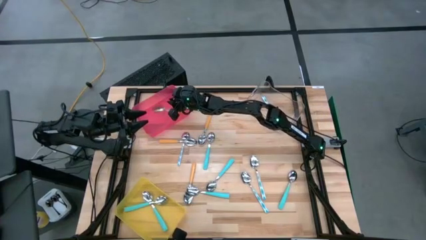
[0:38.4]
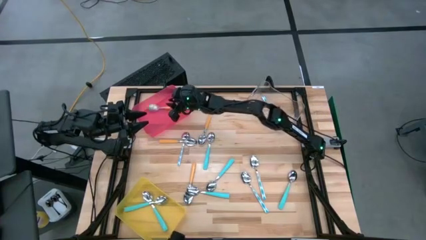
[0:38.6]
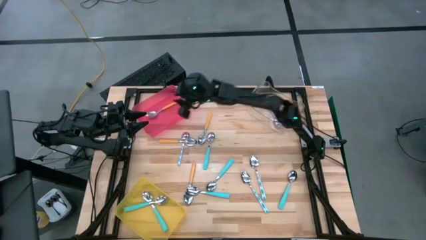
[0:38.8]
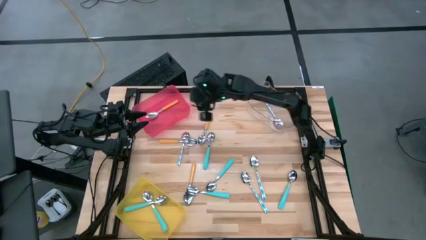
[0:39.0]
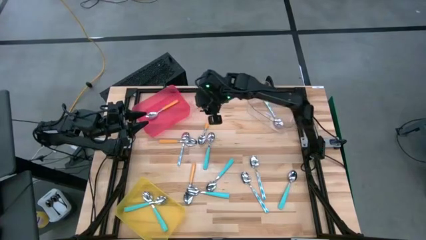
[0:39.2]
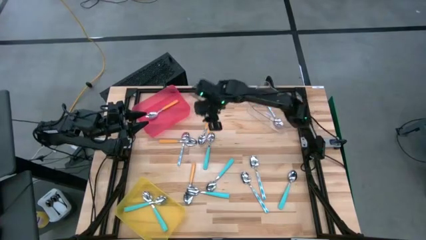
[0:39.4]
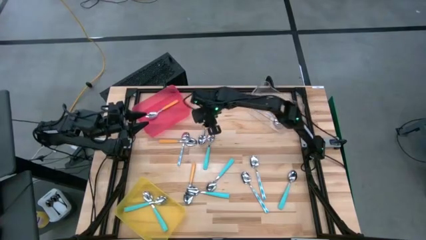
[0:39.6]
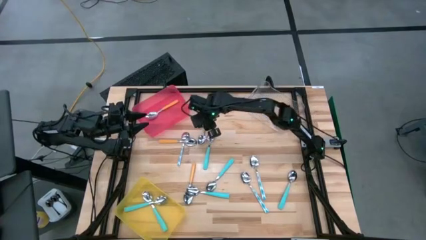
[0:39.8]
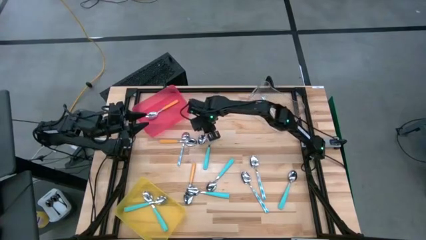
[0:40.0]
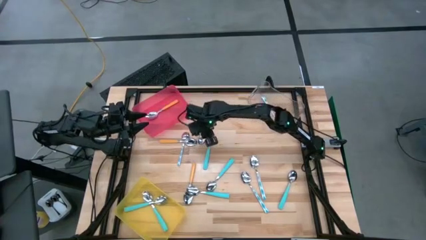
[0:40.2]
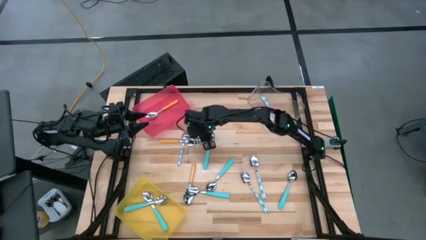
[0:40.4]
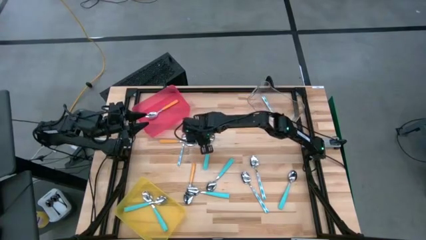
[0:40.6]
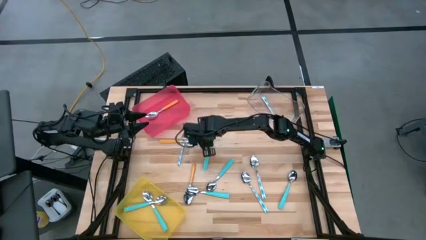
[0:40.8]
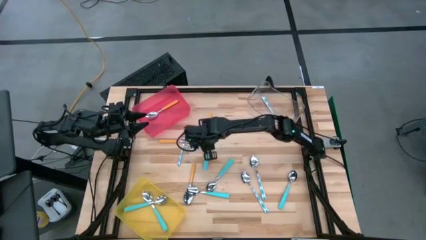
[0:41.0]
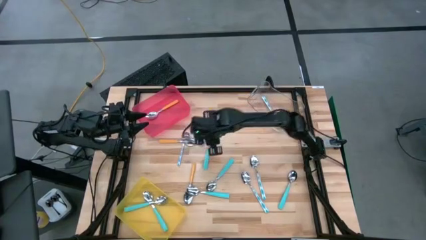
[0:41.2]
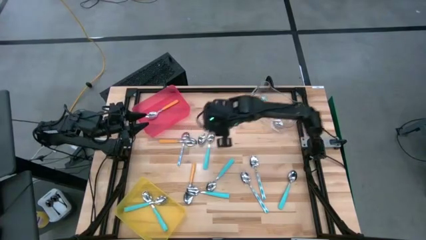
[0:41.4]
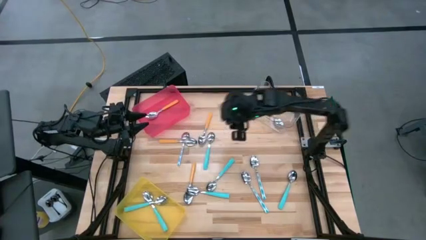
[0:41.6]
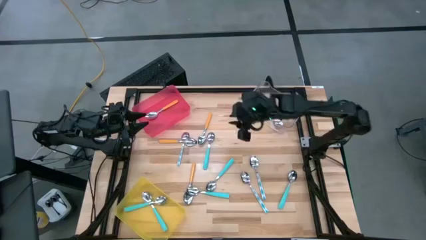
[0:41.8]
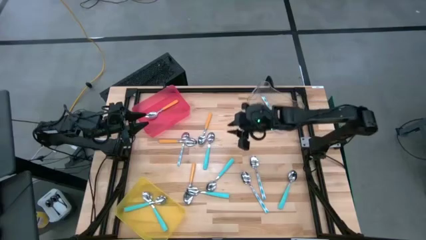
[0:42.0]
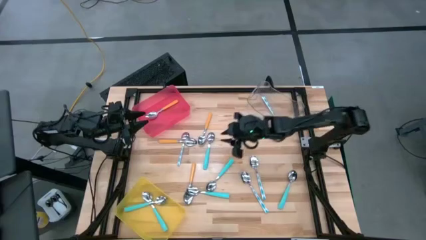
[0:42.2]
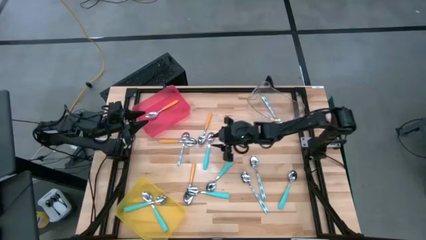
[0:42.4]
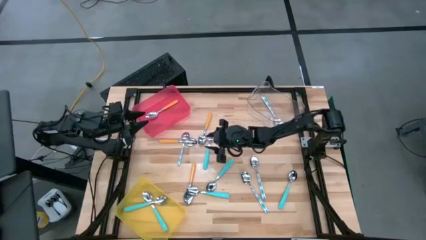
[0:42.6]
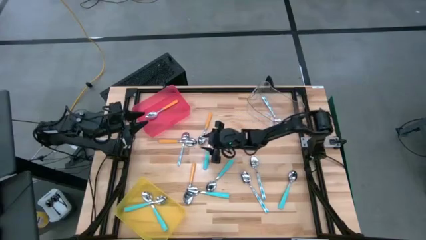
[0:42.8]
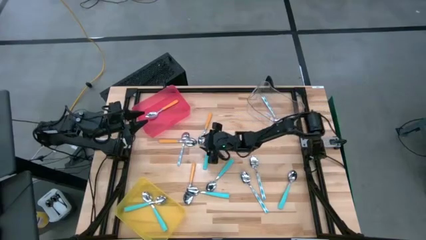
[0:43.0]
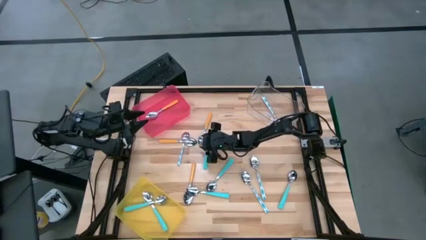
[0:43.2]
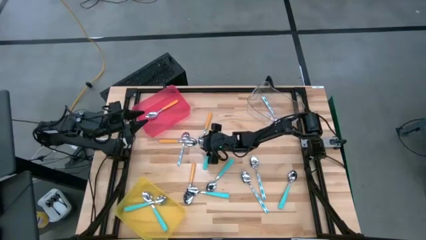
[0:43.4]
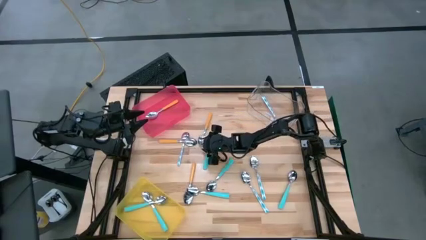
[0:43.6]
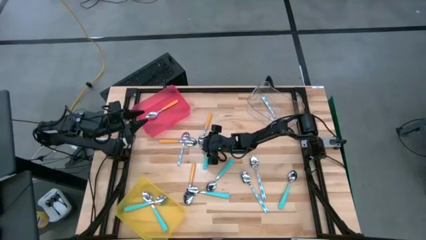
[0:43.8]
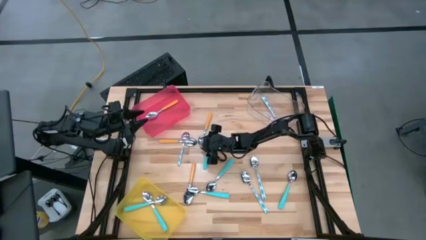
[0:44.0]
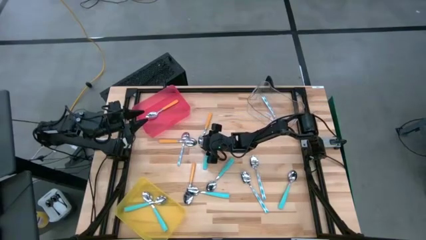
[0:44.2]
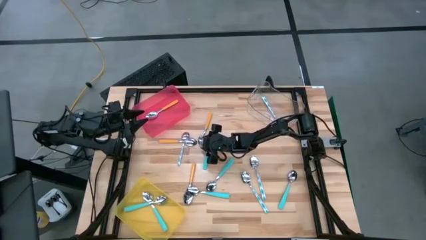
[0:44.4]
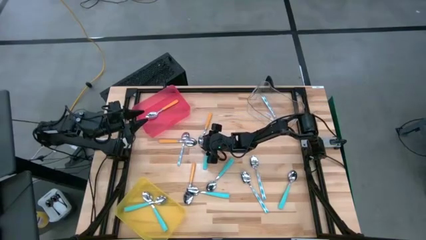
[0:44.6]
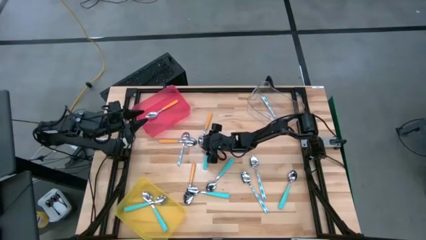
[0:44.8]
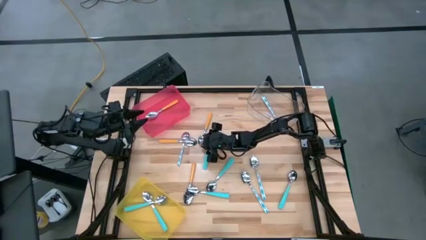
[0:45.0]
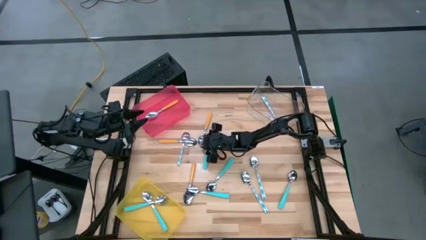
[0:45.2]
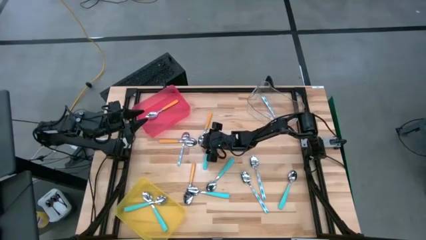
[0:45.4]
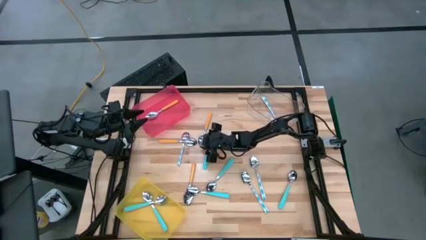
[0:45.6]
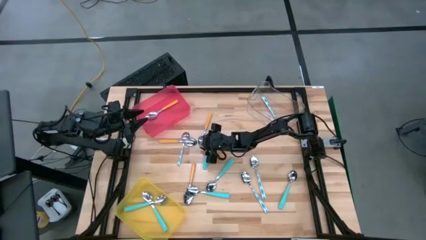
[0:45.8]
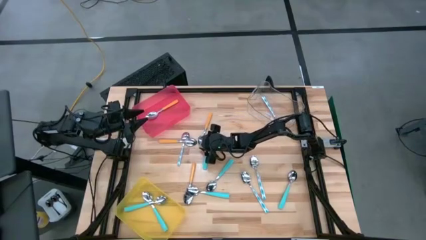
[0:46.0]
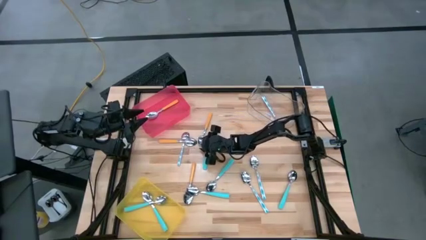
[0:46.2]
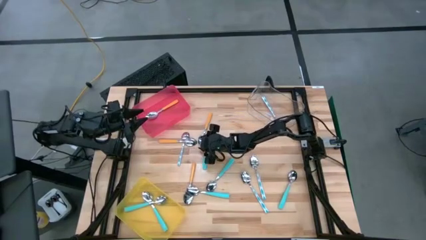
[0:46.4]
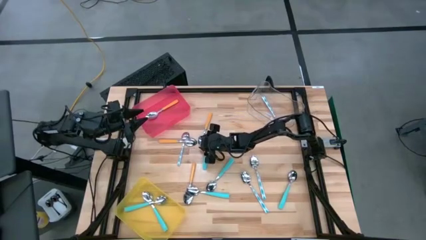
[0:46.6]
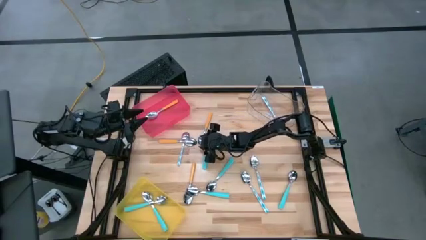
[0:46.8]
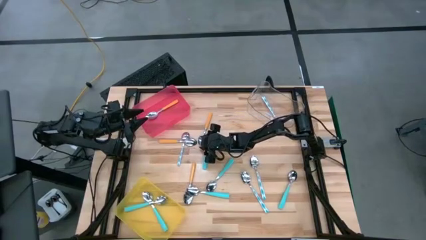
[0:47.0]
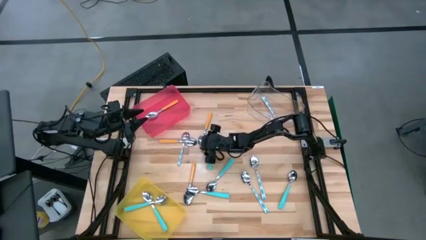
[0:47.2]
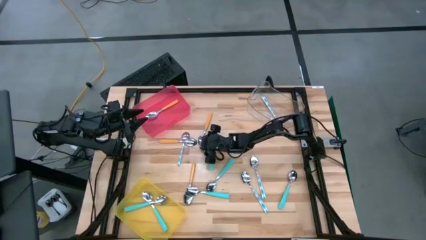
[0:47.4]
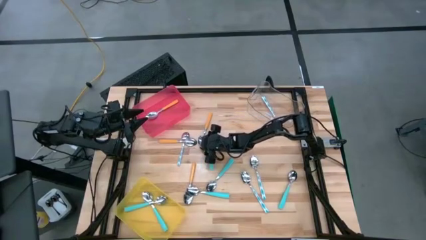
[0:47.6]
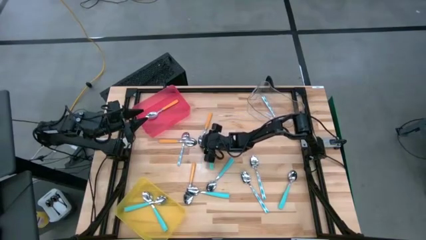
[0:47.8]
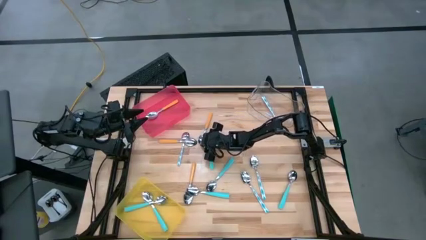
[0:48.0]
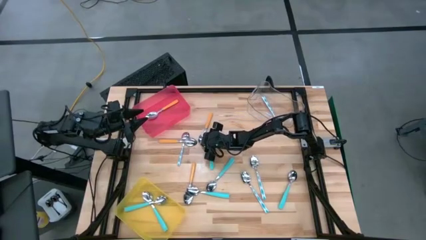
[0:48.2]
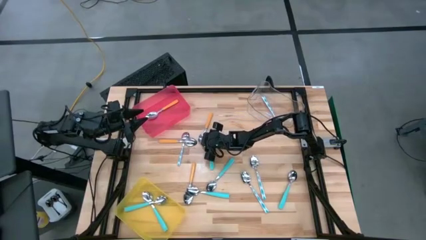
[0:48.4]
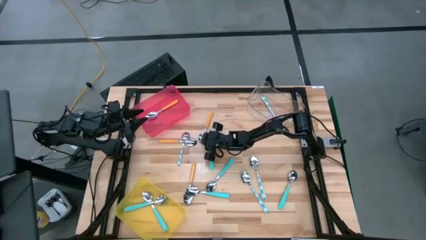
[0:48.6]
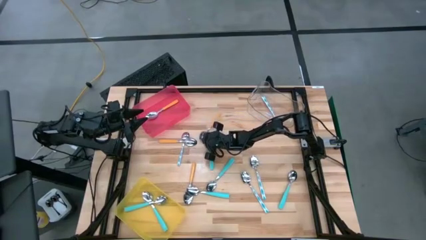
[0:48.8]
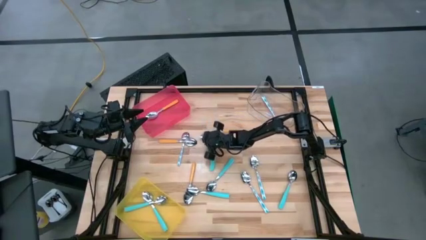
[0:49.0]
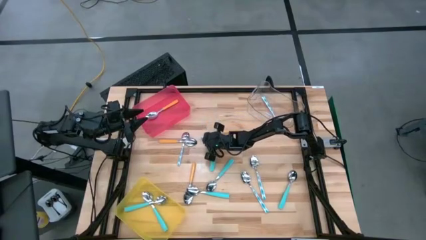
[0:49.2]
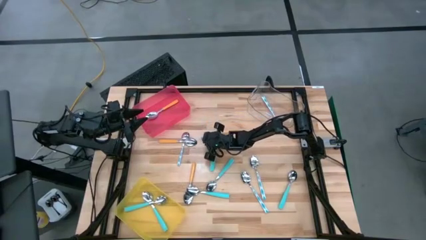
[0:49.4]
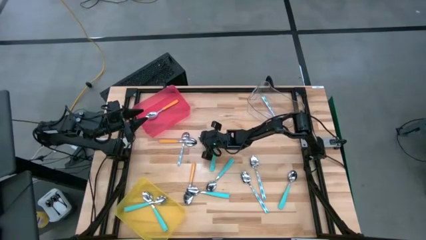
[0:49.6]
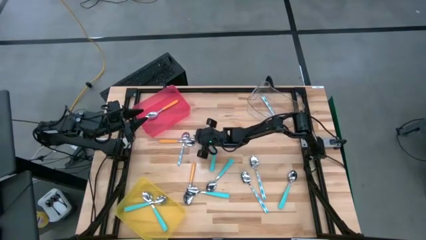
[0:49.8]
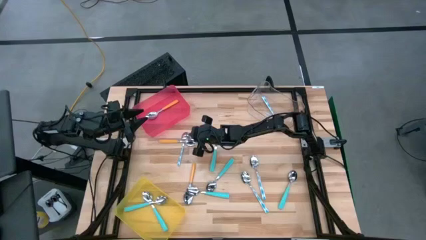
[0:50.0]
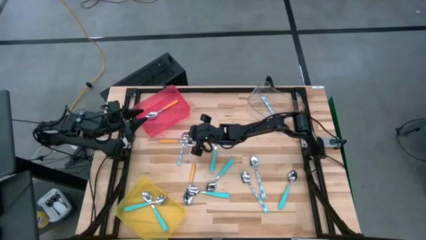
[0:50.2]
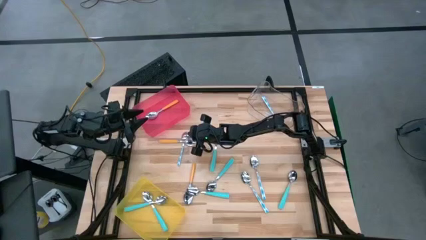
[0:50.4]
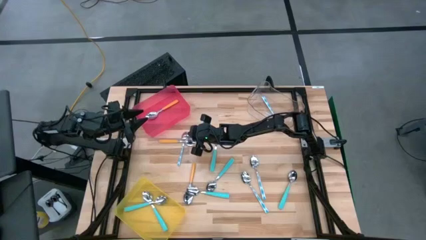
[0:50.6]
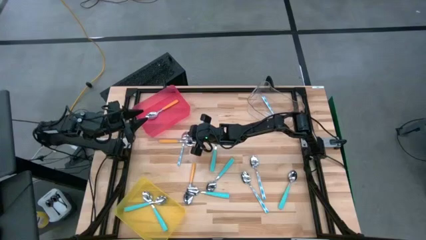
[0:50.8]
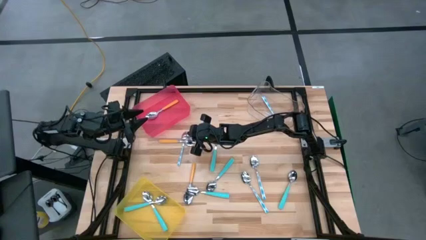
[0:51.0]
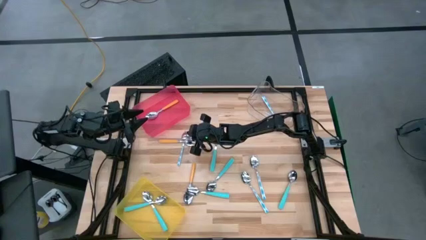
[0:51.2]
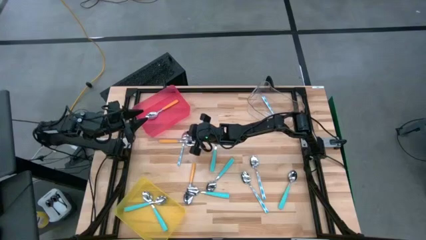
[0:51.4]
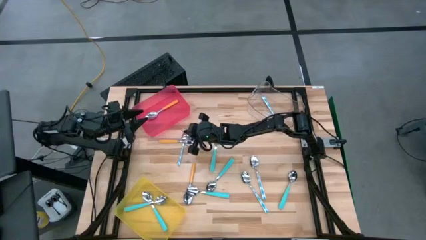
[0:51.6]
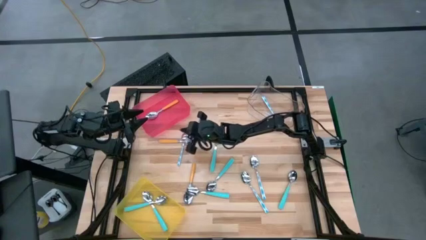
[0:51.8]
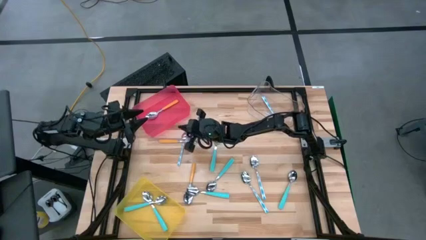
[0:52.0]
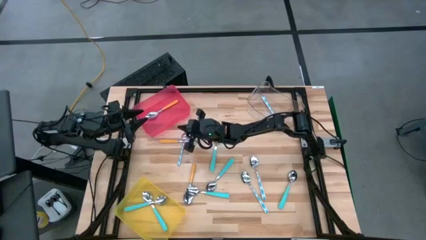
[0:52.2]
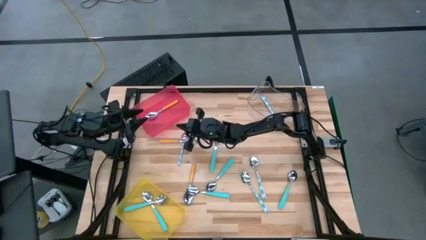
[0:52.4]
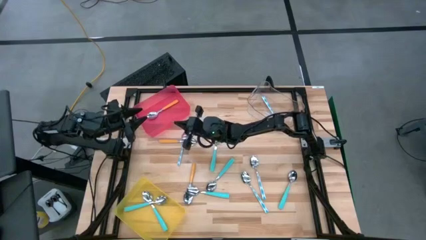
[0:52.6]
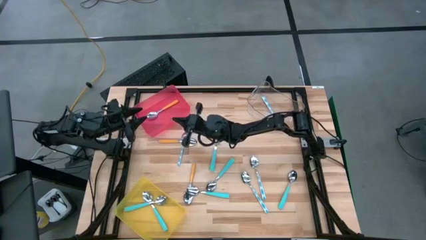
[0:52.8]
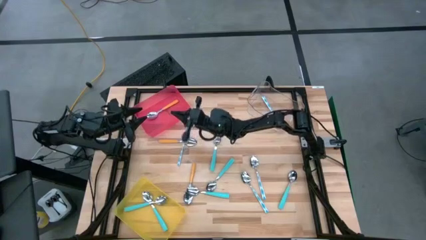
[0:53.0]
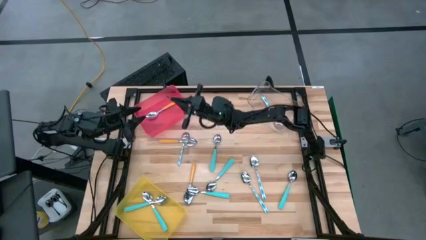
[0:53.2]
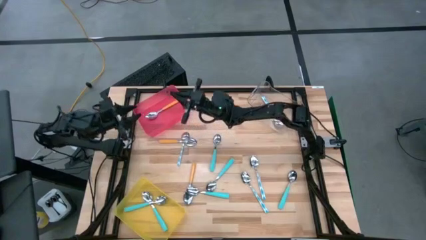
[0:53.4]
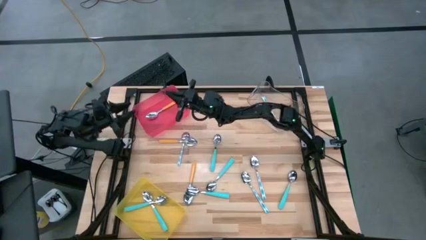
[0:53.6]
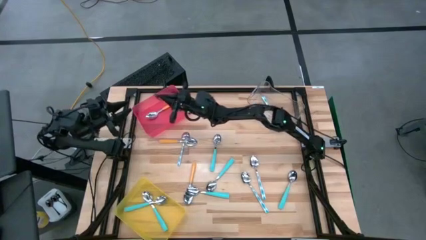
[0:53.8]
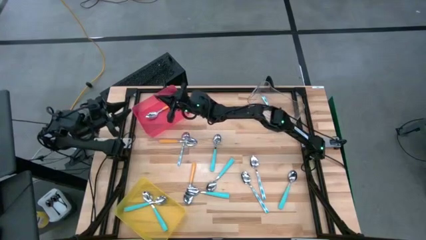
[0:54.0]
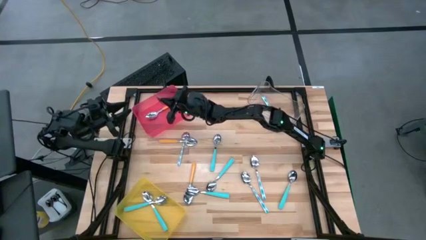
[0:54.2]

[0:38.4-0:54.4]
Task: Sort silverware by color (type)
Put the orange spoon into the red bin
